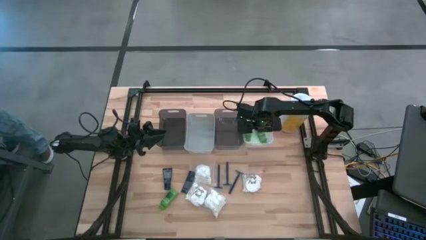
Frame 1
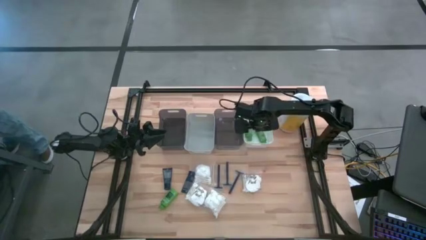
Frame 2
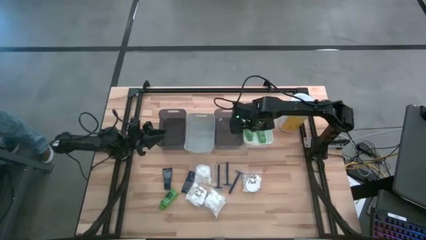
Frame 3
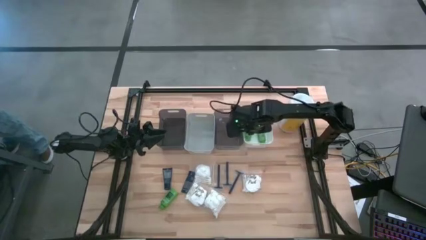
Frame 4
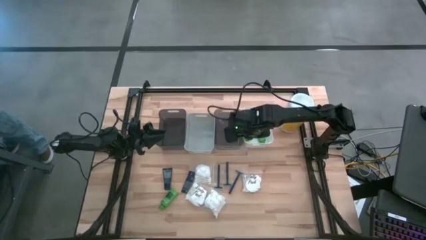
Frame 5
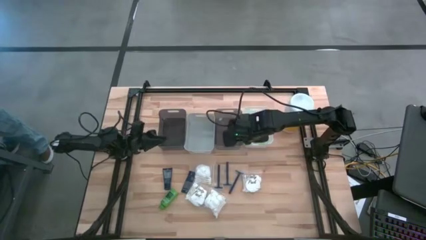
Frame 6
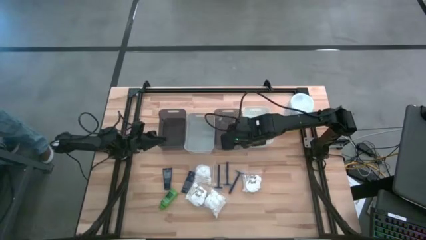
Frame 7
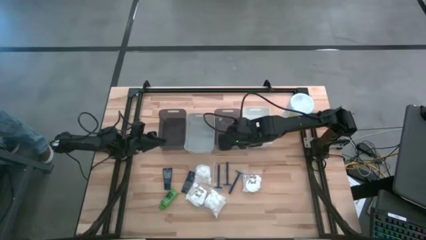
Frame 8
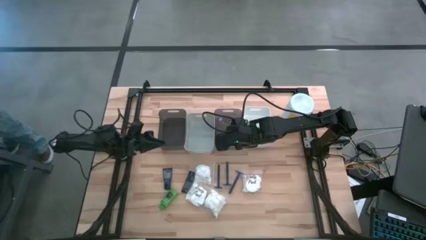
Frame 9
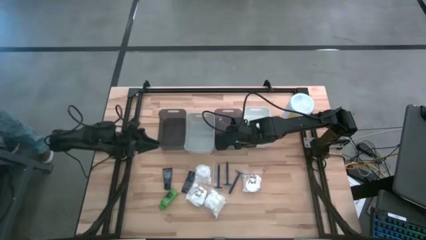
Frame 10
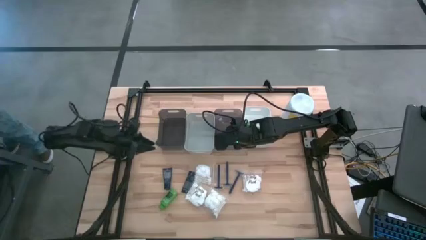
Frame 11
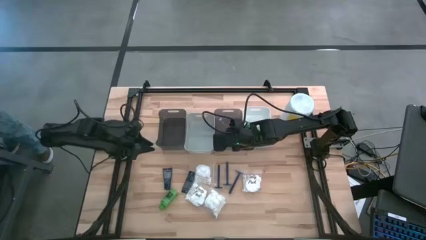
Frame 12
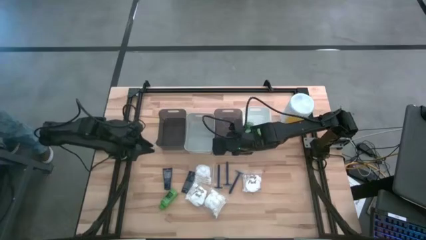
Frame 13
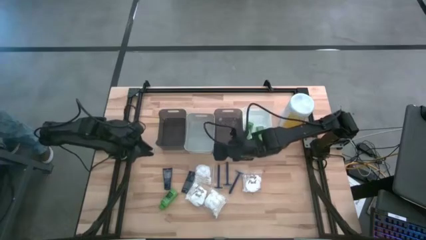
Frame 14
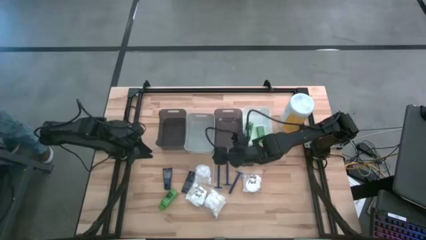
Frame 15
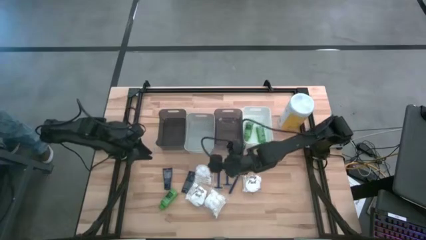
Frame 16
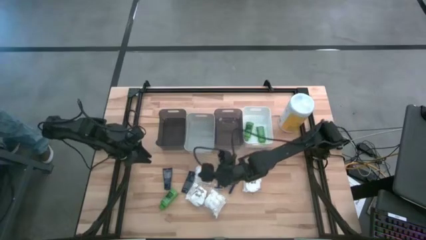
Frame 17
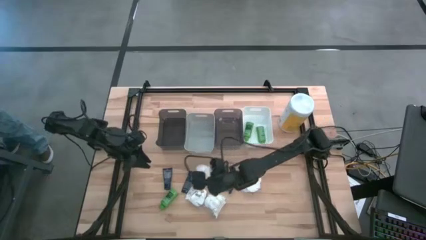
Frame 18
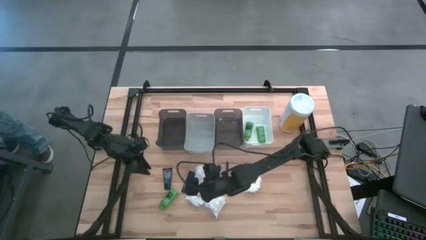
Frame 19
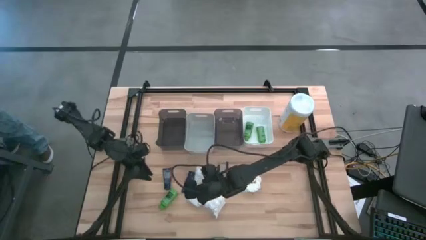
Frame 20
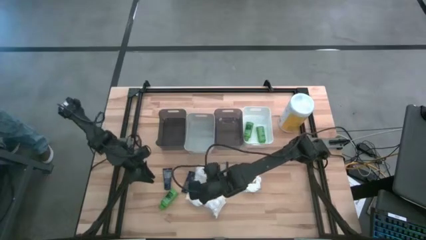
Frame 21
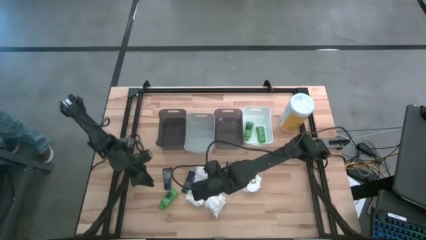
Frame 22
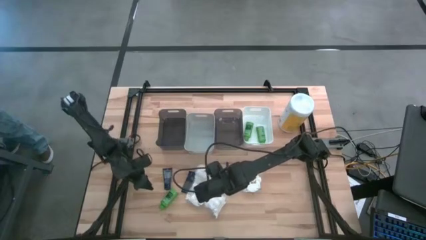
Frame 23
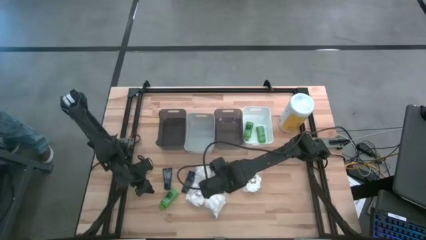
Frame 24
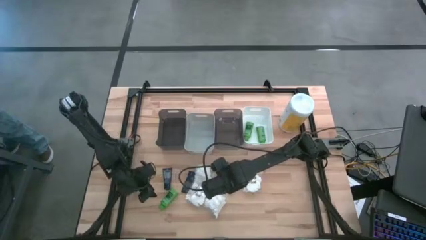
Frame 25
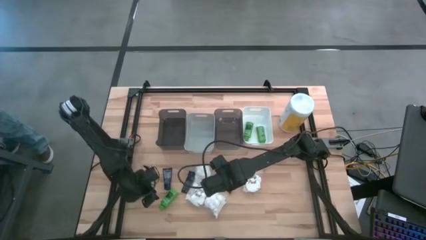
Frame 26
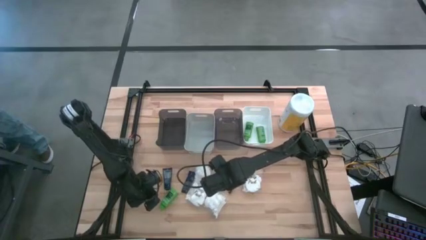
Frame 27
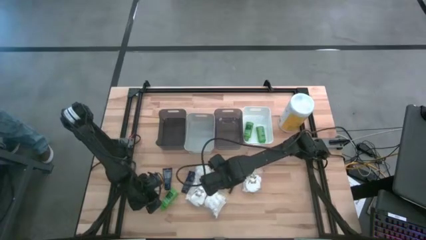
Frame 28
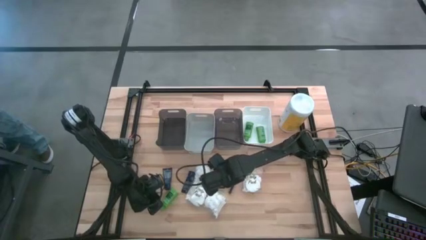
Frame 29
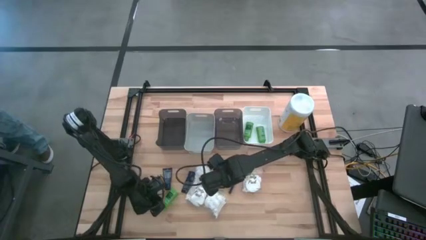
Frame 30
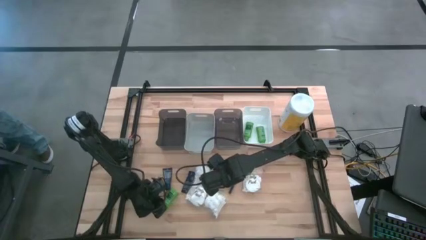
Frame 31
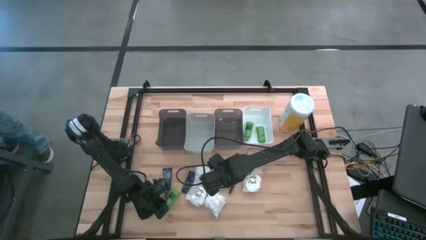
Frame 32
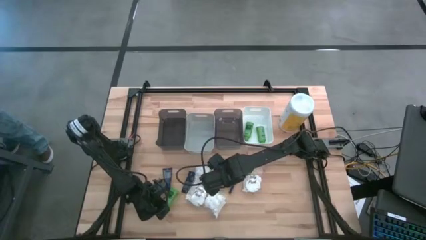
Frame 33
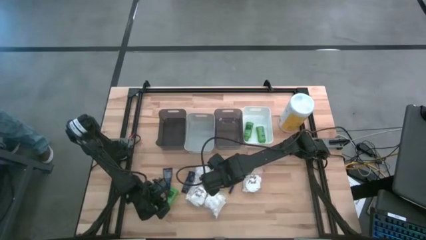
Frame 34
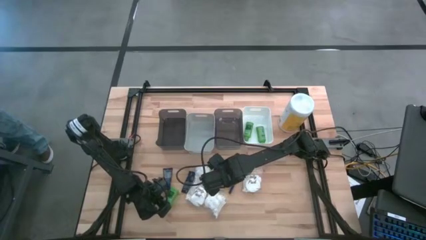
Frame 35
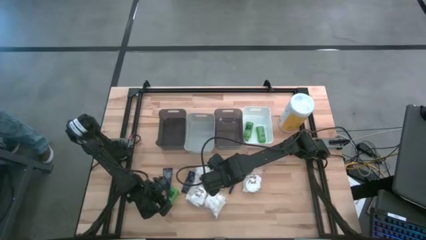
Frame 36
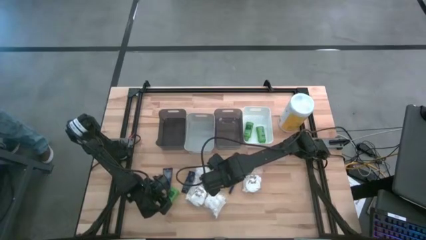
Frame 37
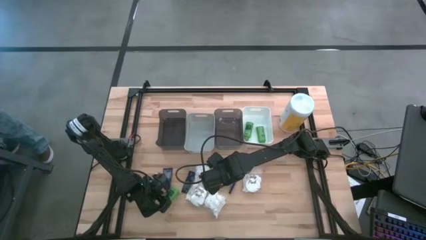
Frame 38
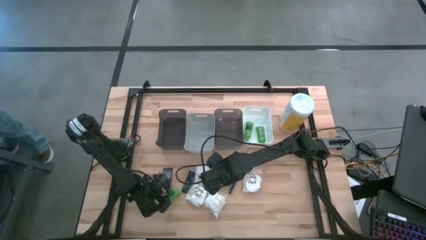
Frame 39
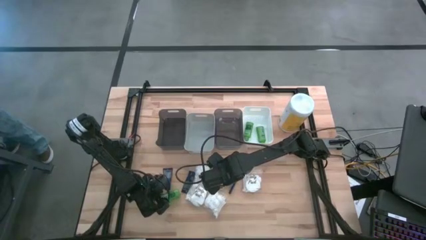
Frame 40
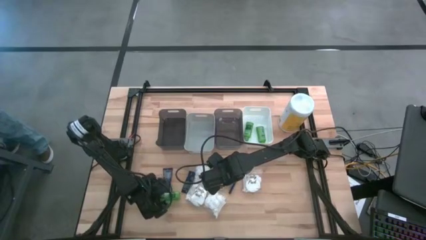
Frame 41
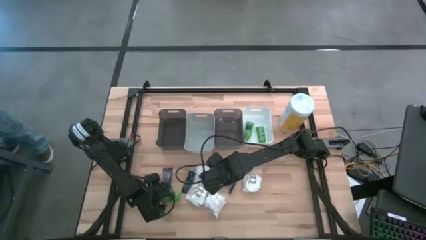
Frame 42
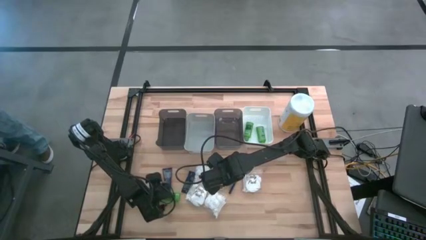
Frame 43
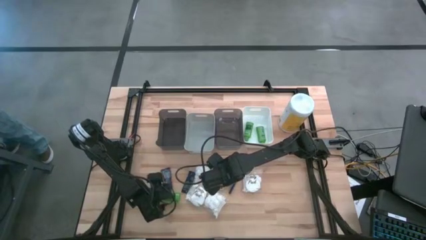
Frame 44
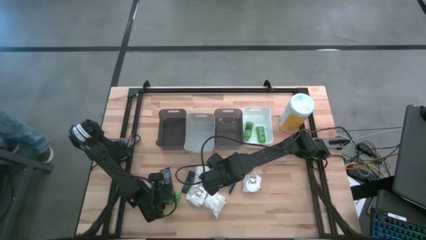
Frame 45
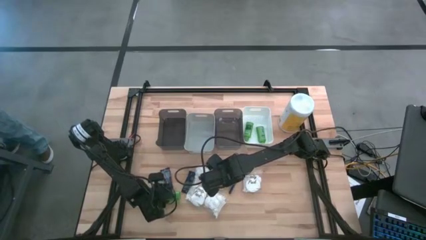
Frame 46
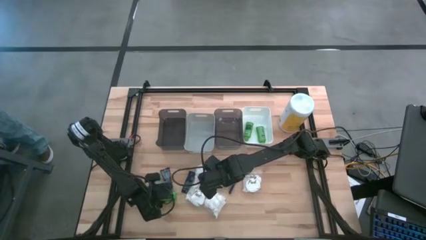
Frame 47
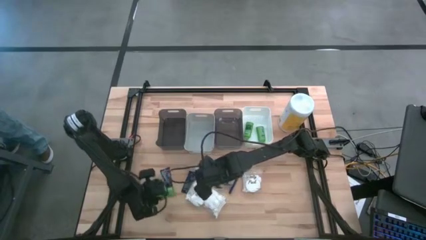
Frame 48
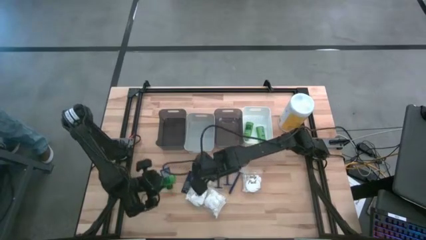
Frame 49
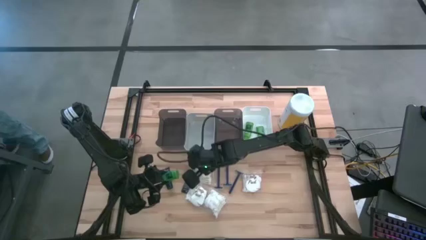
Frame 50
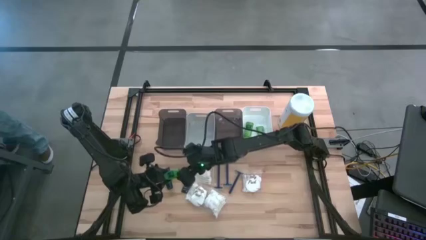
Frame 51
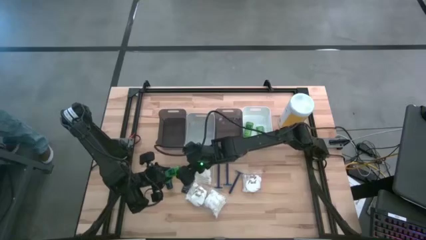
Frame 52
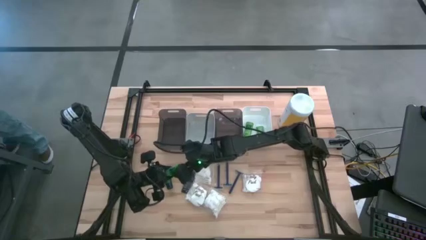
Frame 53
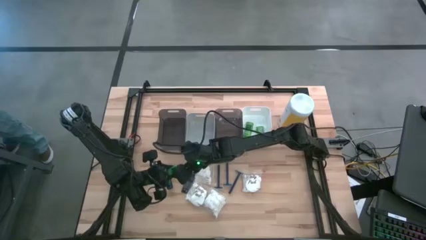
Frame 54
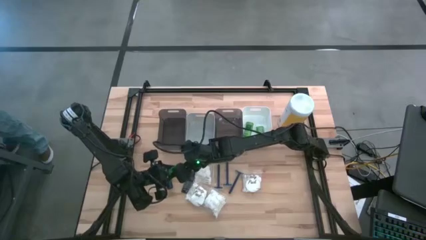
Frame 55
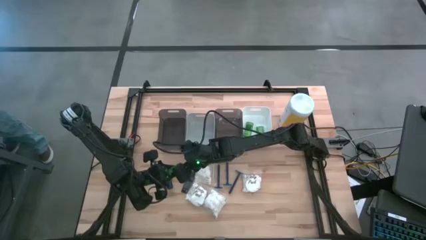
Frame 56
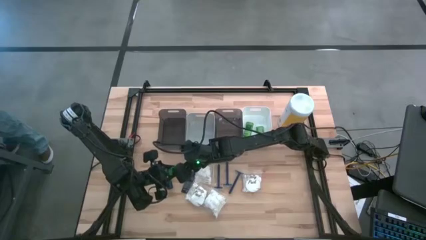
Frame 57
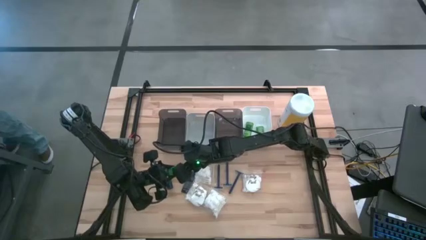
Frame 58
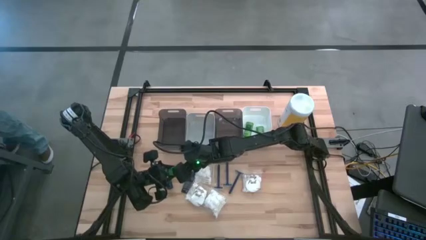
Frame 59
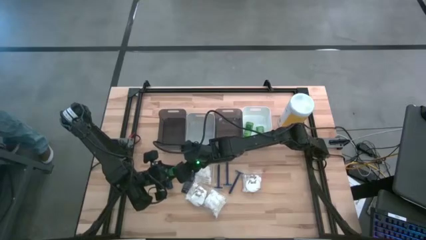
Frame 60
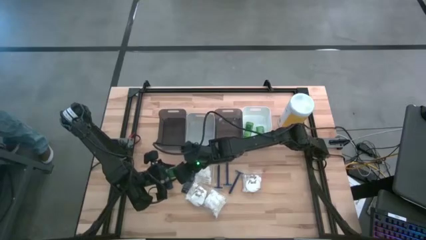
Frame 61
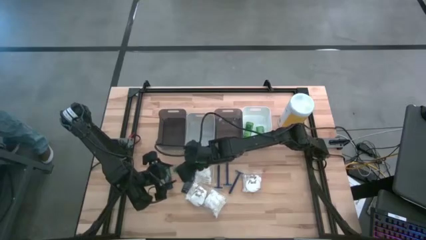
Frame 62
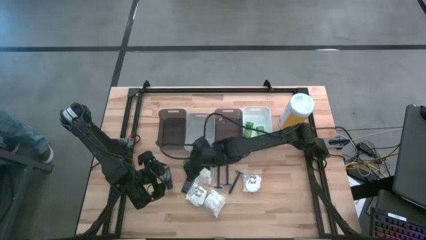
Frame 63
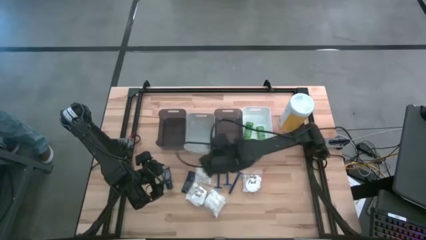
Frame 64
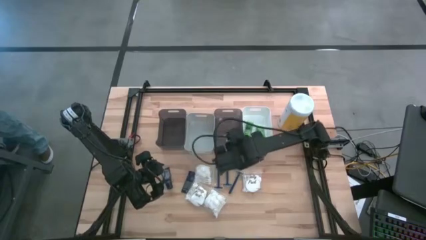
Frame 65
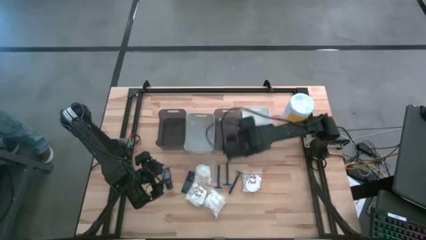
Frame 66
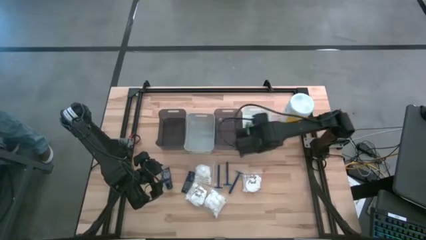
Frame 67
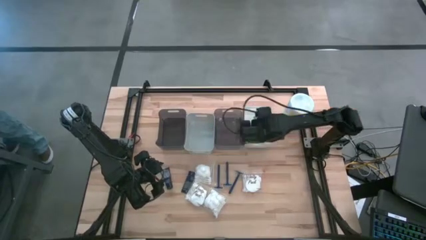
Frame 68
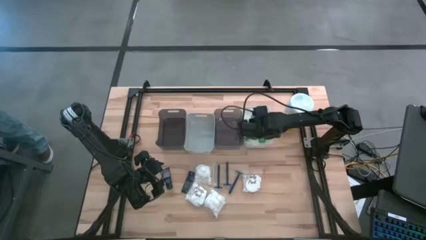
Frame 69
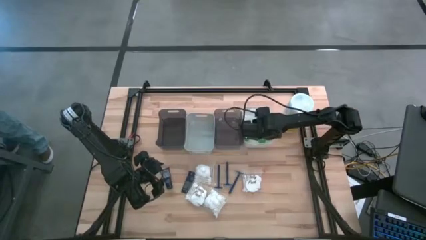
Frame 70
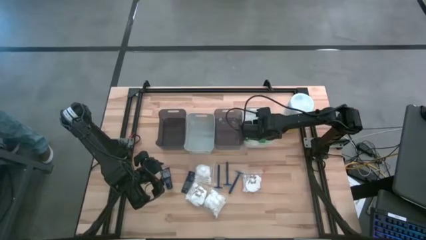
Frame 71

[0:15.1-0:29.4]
Task: Pick & Place Travel size toiletries
Put the green shampoo into the white bin

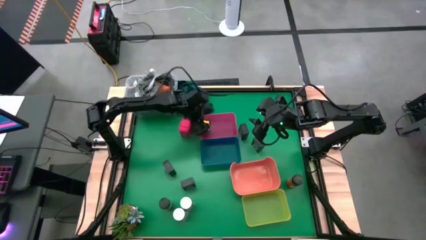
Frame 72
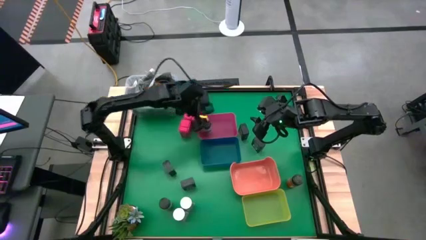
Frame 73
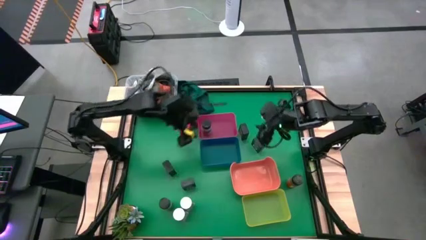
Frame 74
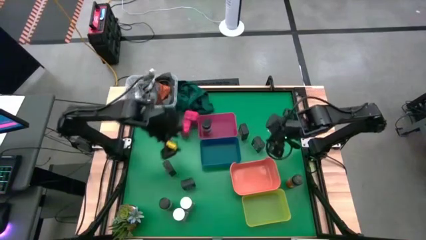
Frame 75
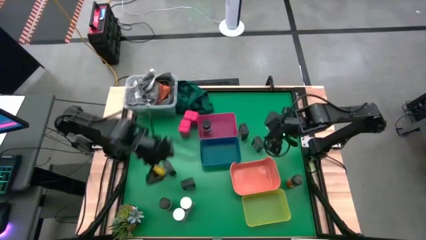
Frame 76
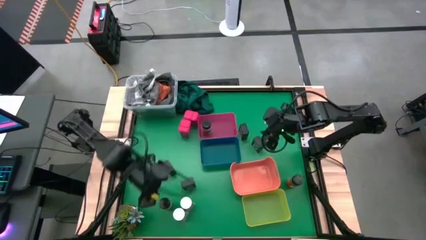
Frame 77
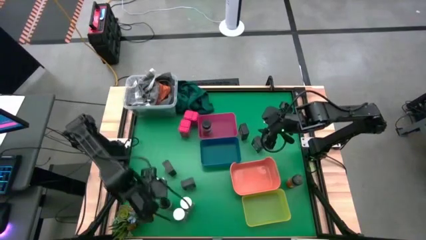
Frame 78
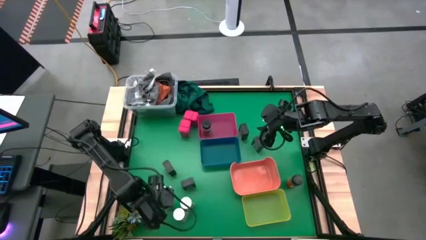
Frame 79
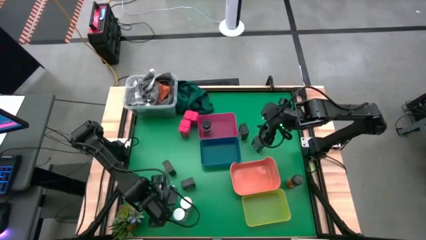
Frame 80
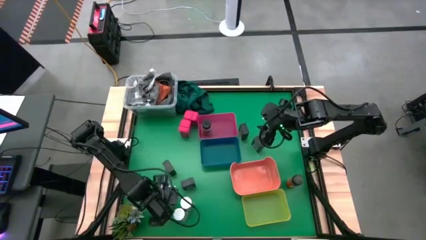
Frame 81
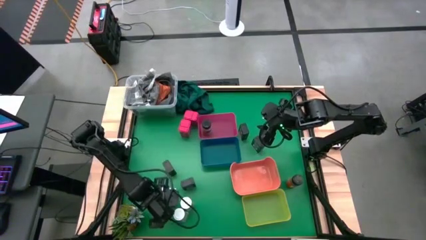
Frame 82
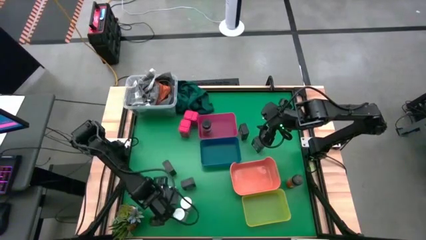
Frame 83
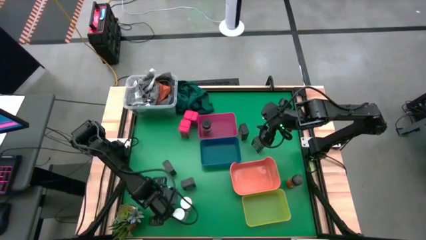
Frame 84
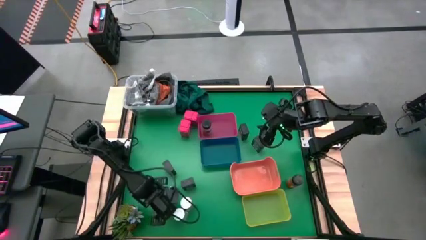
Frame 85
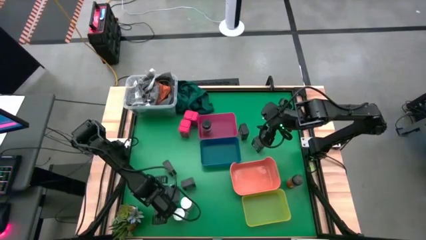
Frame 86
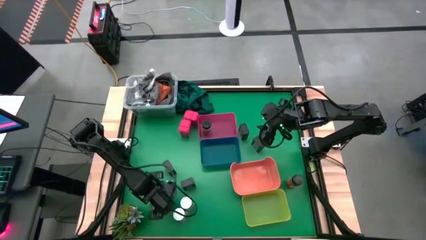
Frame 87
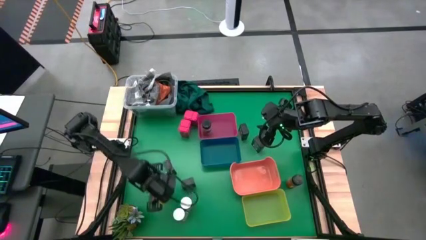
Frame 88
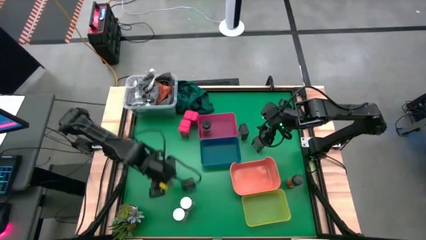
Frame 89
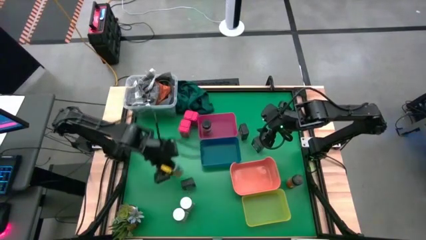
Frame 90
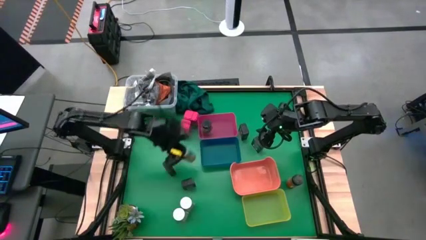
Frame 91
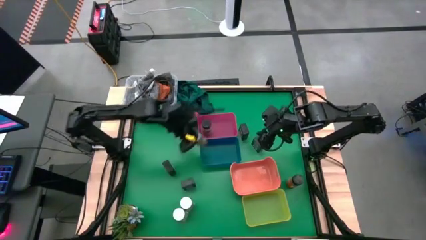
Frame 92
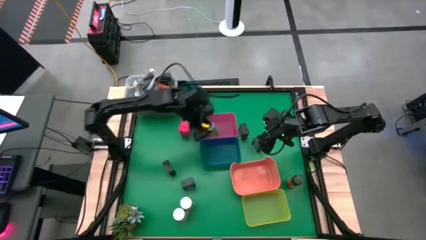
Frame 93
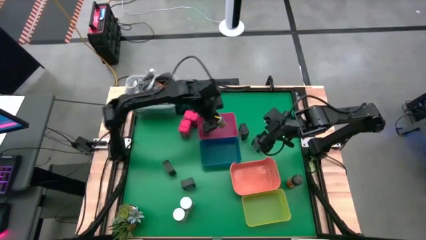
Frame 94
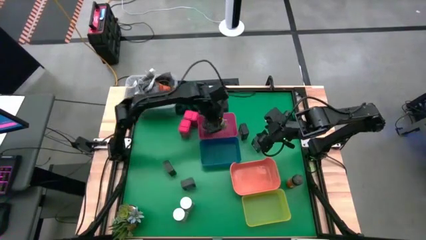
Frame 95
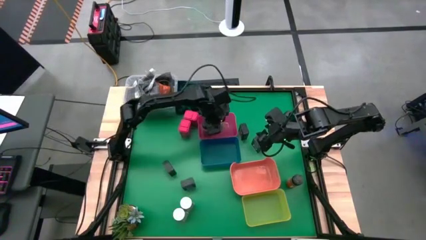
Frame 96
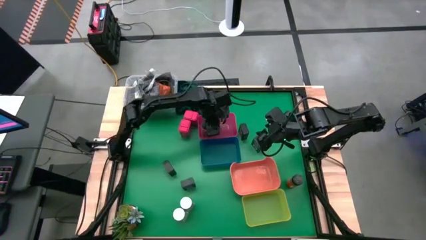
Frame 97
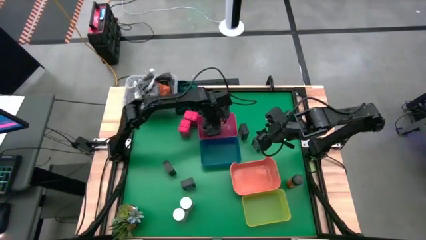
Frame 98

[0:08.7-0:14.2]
Task: Sort spices by type
Put the left black seasoning bottle into the pink bin
